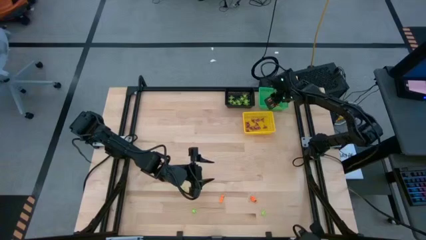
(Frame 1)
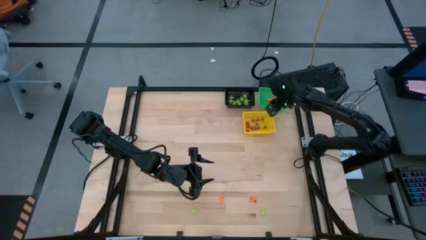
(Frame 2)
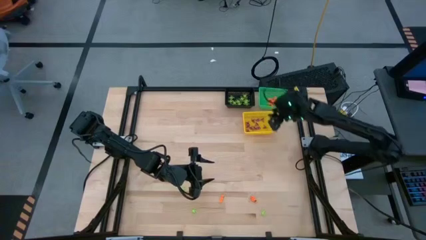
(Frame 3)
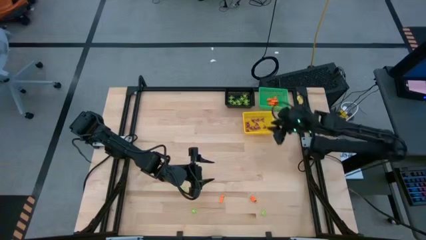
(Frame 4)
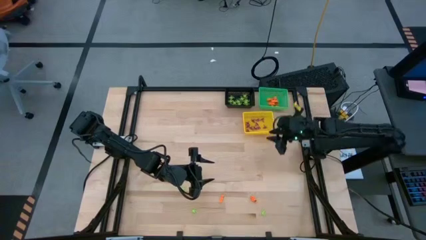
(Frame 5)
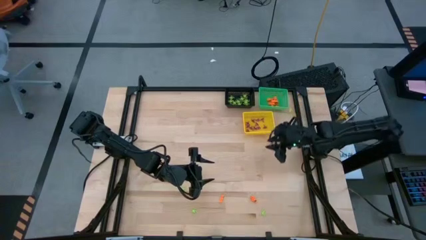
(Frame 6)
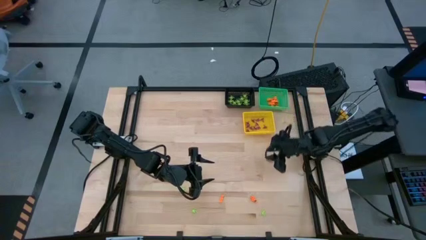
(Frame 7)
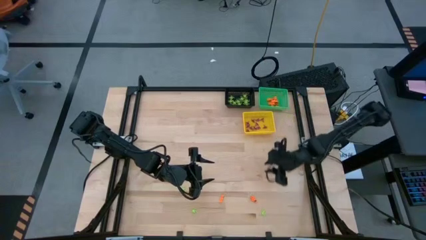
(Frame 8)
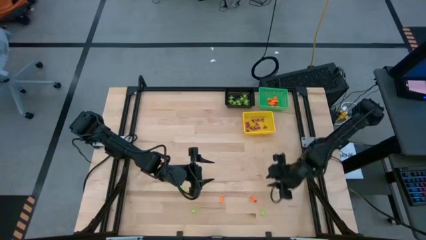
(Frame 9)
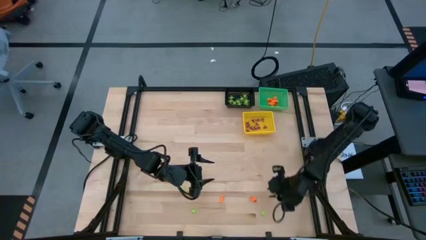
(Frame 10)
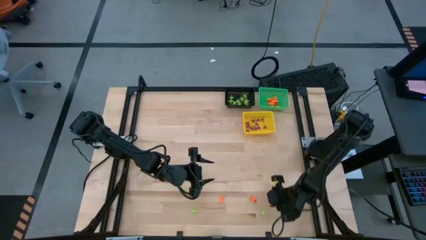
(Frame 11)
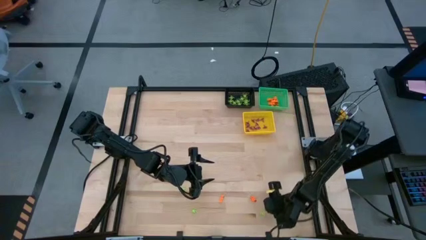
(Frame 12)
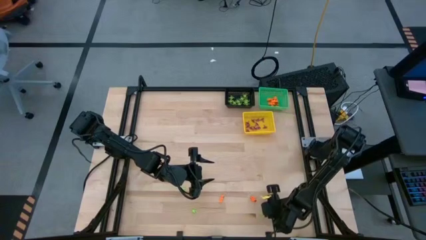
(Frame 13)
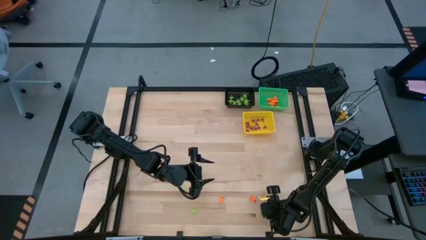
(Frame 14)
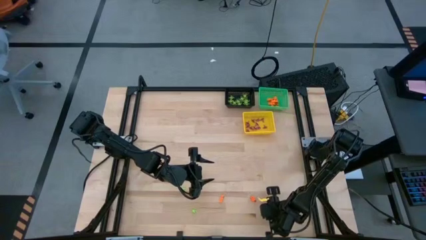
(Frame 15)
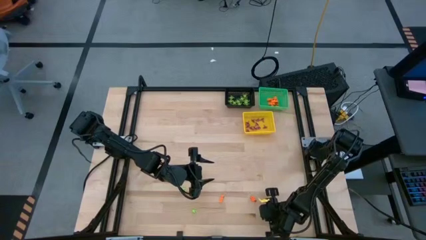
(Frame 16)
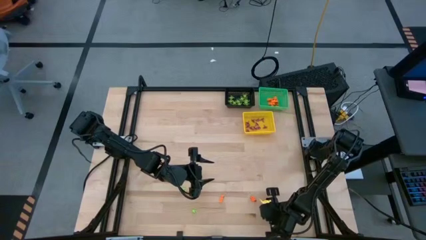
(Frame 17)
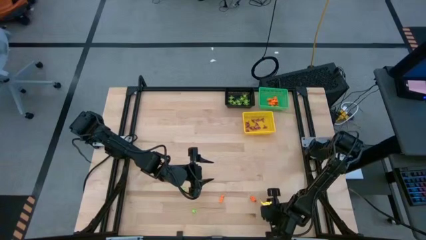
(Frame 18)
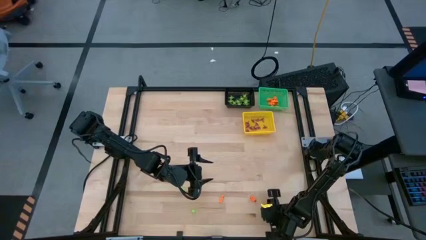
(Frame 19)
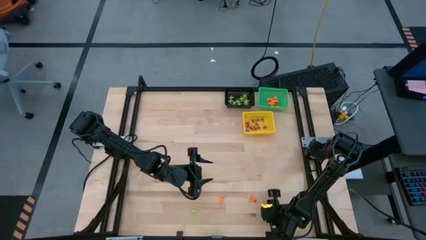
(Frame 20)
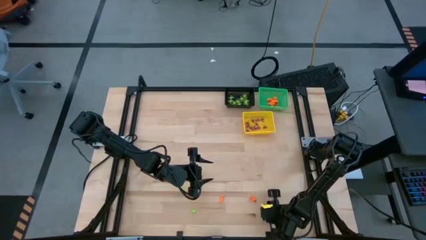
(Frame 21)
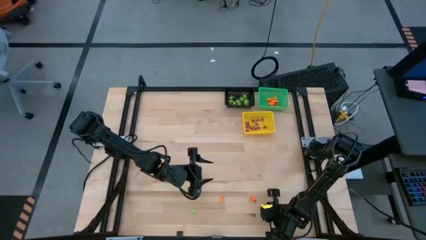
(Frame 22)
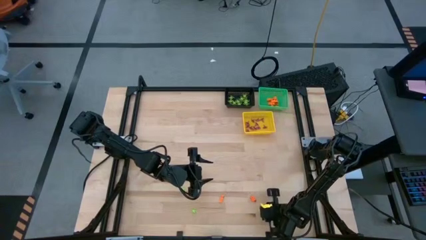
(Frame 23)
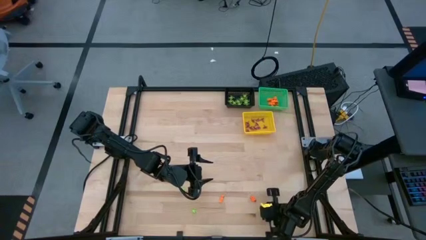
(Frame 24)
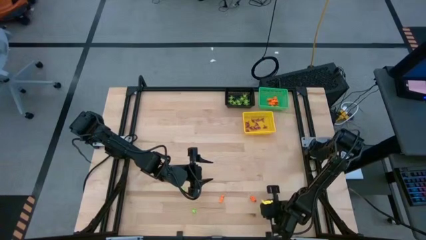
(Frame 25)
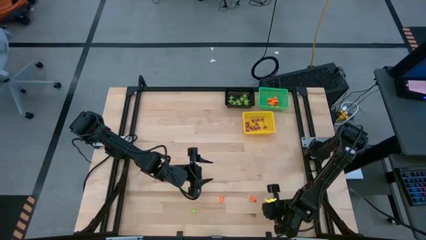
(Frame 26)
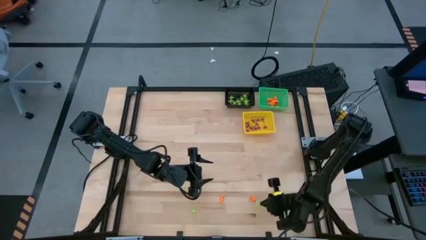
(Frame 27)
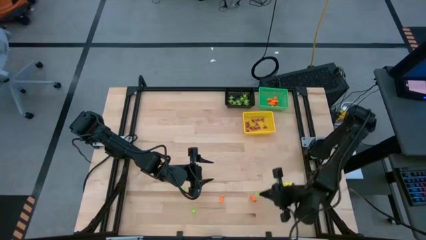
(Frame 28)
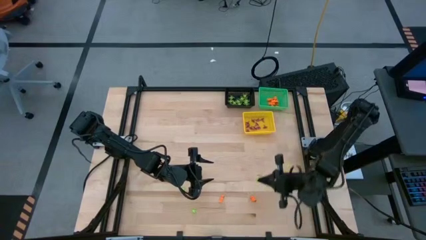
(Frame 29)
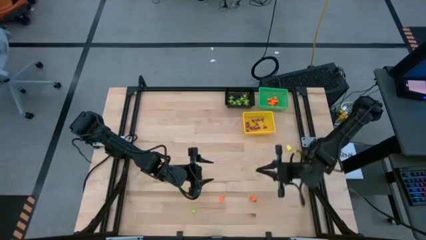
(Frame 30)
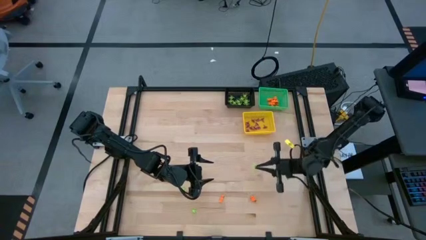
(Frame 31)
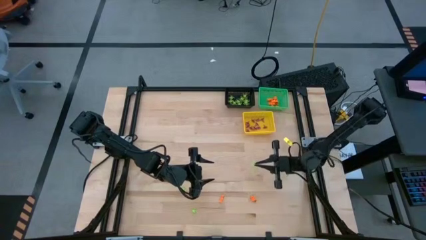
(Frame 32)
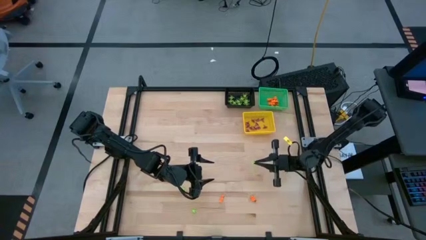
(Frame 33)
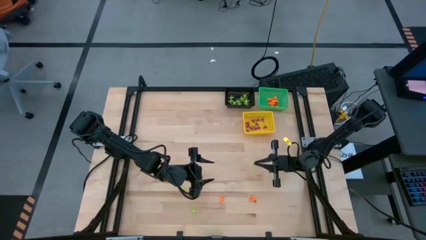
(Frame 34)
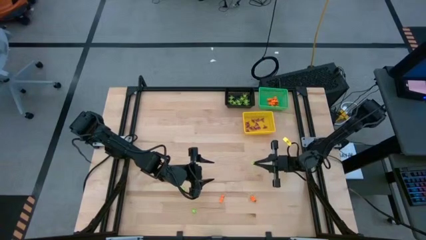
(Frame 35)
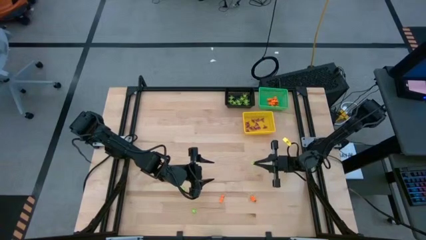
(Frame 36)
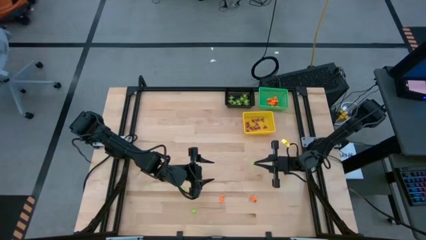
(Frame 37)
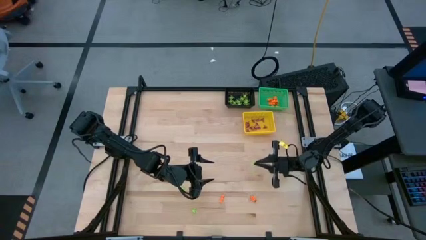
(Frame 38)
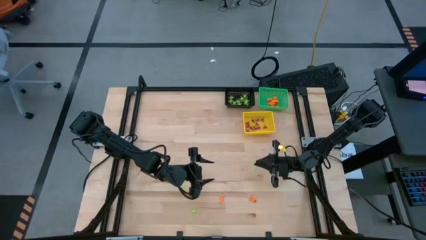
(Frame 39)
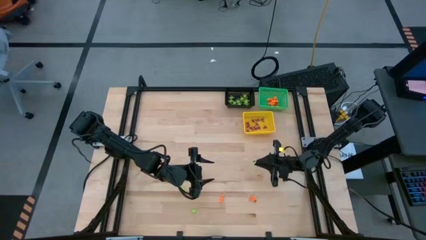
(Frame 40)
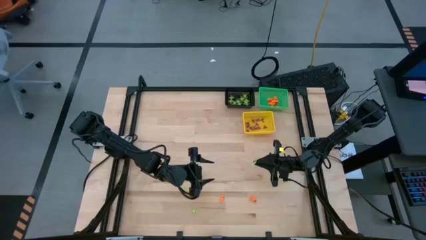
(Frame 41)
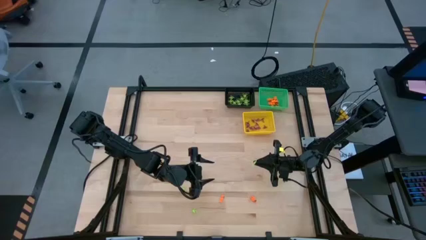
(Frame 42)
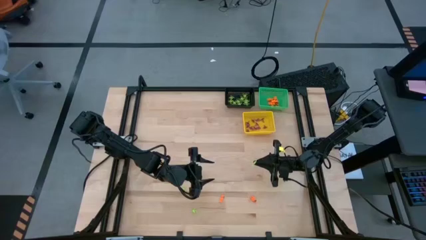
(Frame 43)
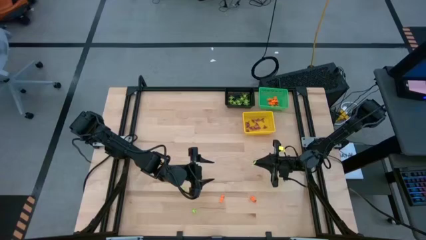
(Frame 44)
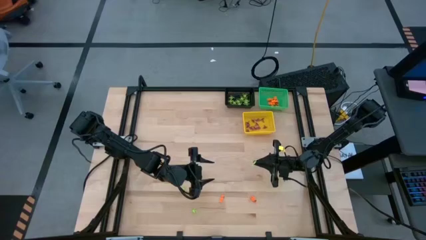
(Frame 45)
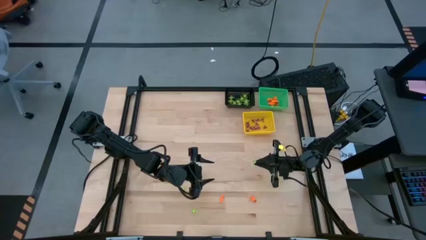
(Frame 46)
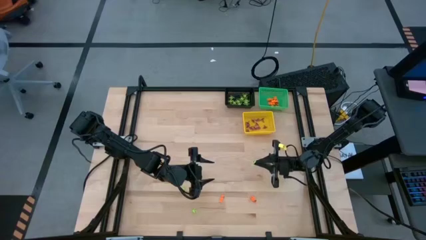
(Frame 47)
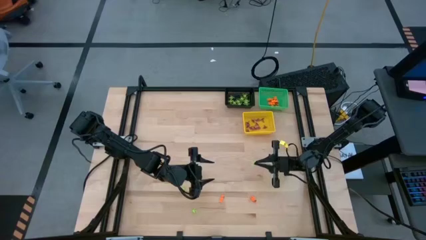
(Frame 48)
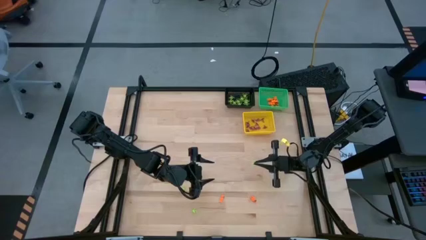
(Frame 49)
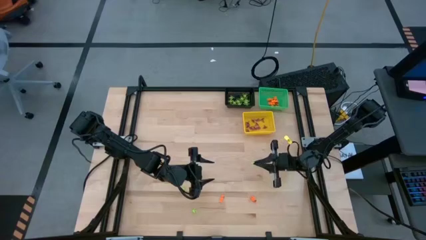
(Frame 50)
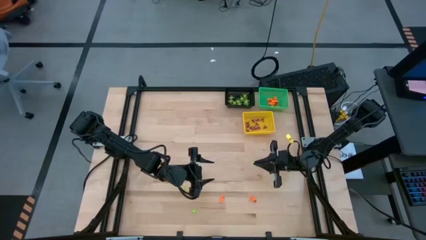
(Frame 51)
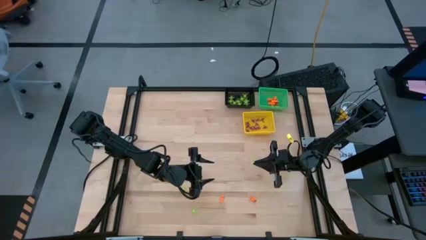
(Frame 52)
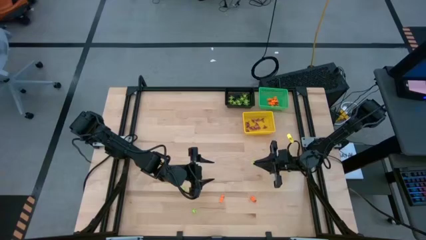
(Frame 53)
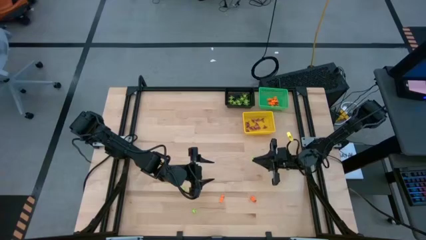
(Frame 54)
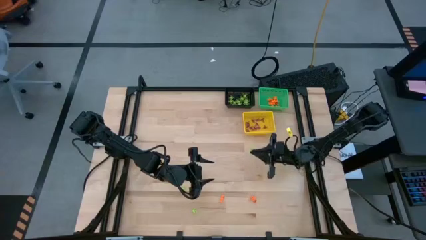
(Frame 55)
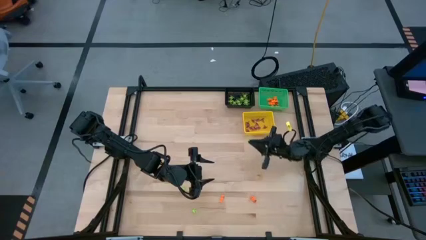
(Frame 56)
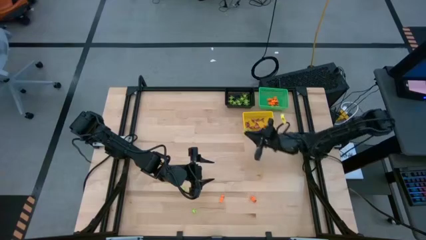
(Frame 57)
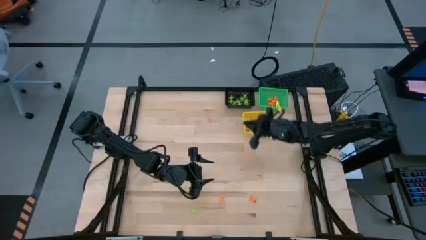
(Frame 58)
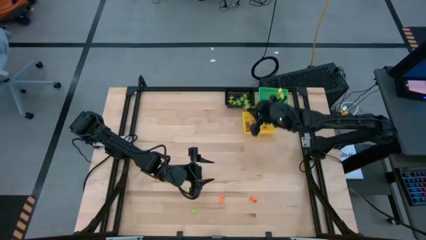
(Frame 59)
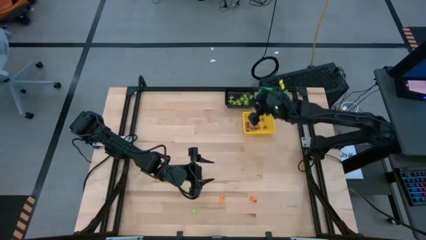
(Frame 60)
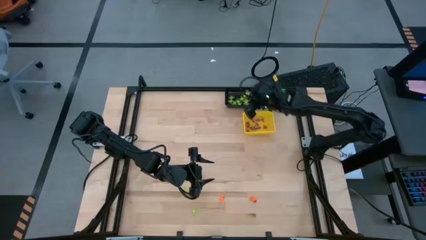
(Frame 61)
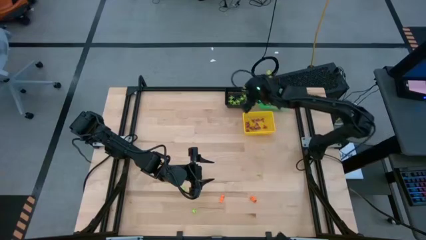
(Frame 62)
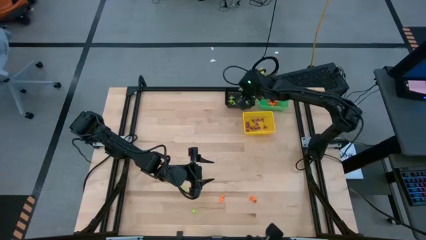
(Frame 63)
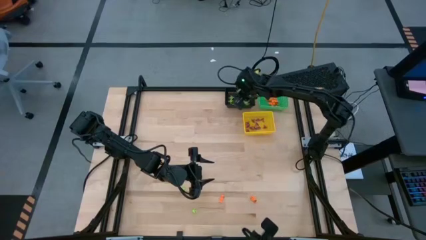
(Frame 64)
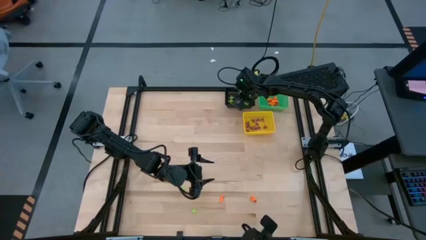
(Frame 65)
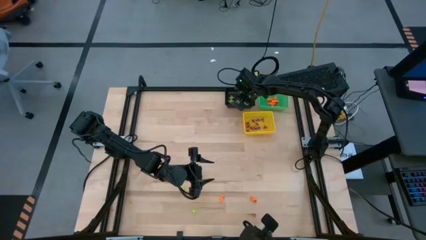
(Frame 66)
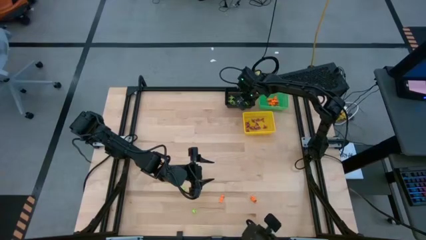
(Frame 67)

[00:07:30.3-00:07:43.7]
Task: Sort Halloween decoration
Put the green spider toy into the black basket

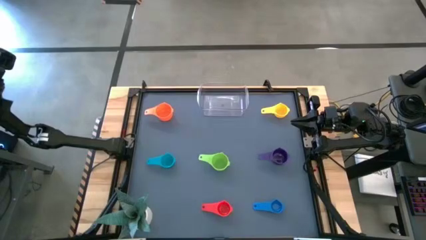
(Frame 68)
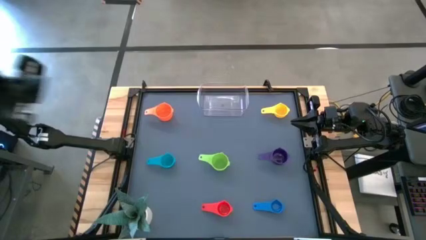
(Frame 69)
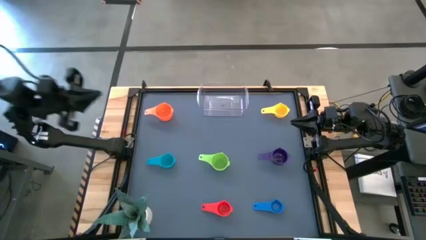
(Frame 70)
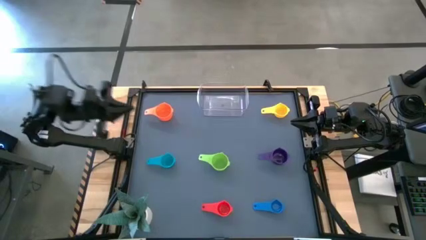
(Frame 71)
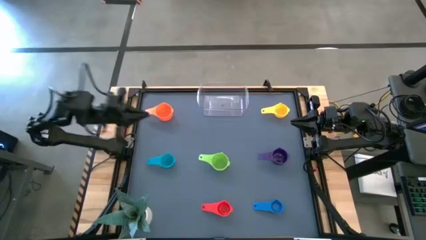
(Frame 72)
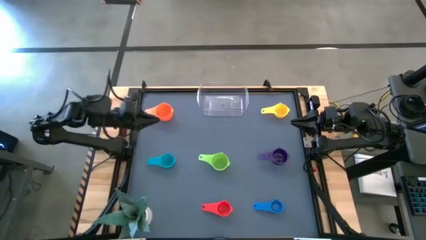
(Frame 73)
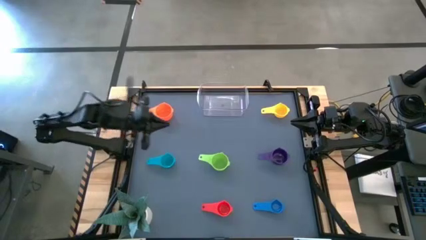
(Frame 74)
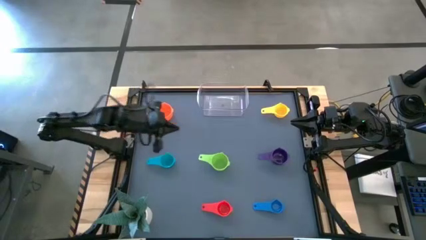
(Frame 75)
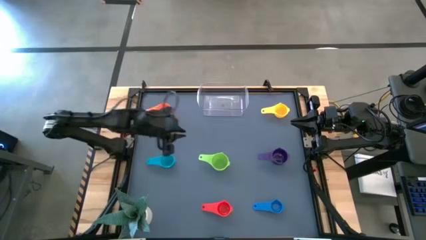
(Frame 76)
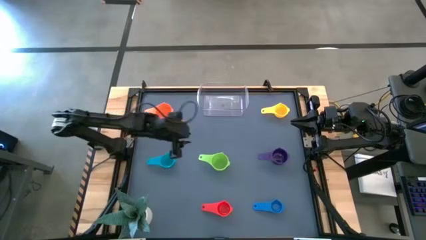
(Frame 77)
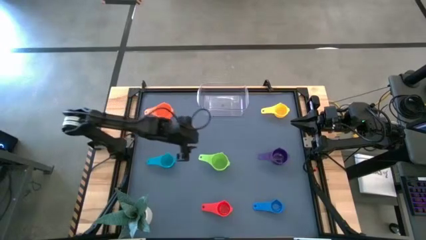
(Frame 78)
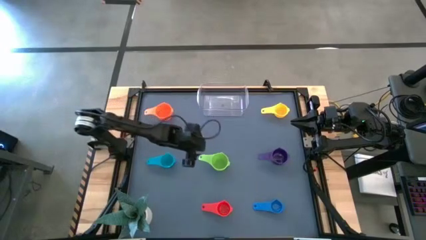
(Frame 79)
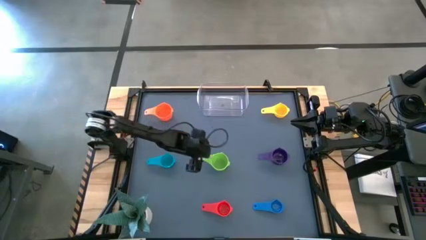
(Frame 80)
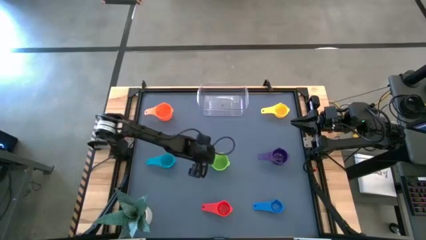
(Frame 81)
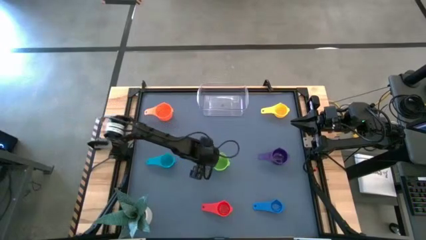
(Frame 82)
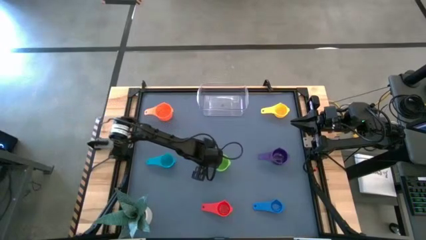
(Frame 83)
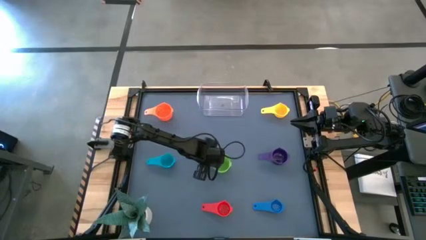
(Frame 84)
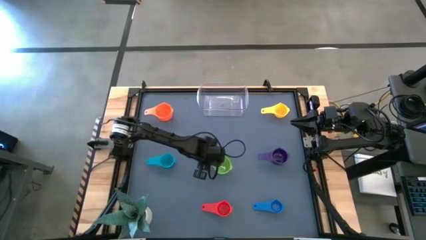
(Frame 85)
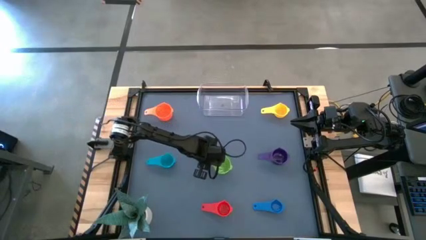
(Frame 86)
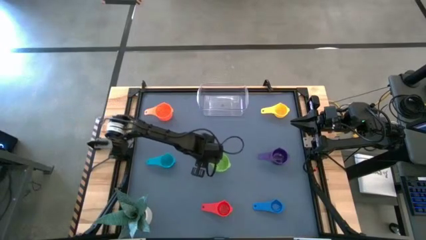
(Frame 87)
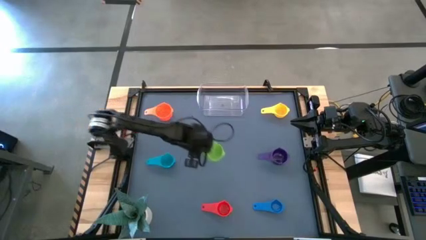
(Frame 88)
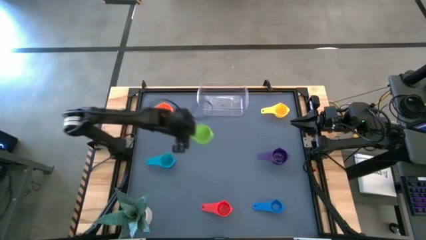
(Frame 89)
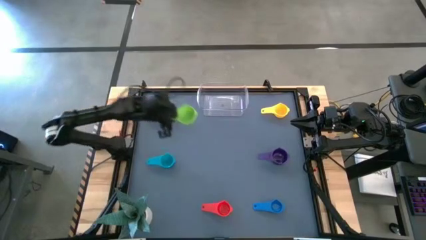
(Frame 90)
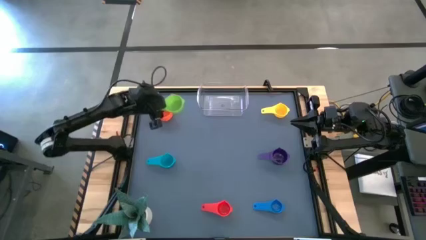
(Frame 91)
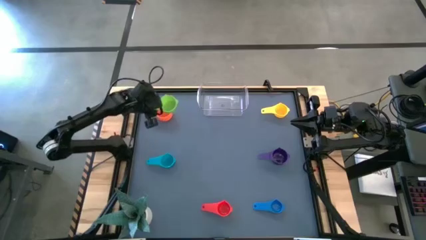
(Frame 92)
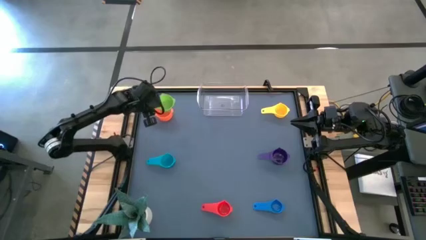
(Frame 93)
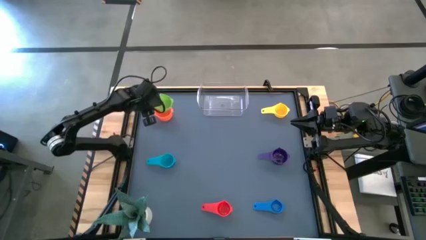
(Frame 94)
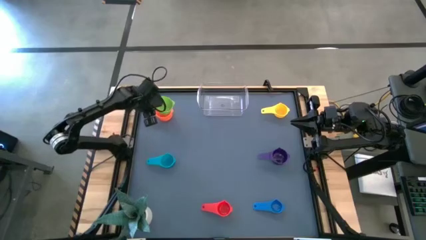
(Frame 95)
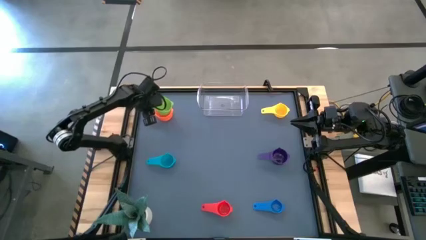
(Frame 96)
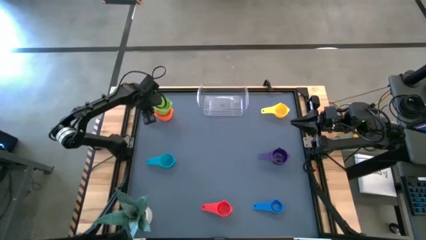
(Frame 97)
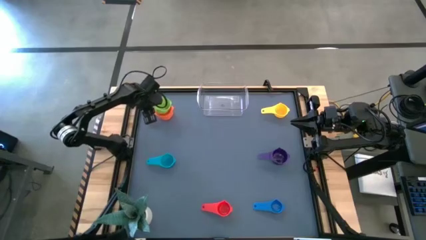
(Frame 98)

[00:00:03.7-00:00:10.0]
Task: Nest measuring cups in basket
Stack the green measuring cup on top of the orange measuring cup
